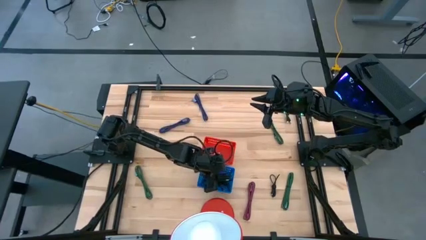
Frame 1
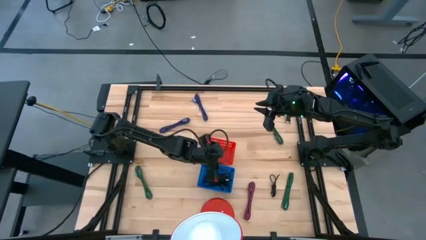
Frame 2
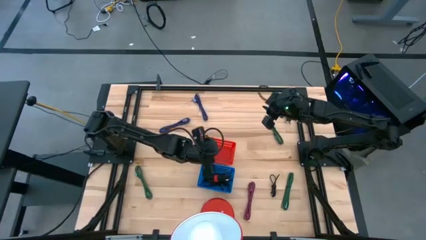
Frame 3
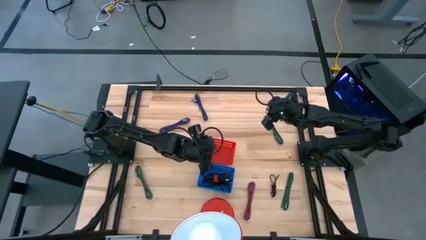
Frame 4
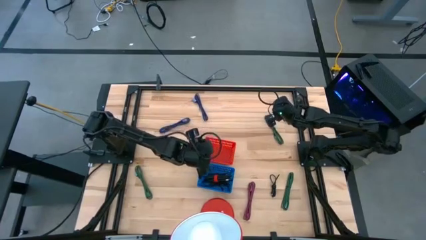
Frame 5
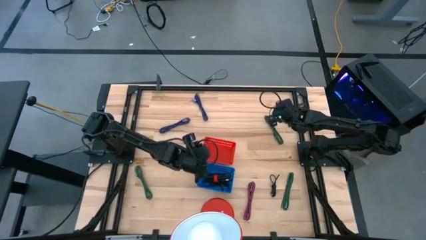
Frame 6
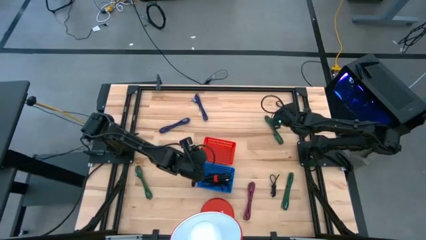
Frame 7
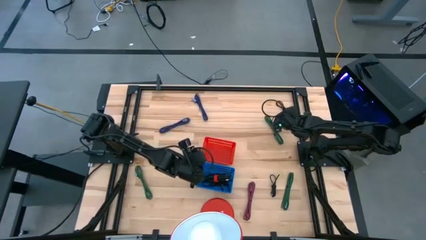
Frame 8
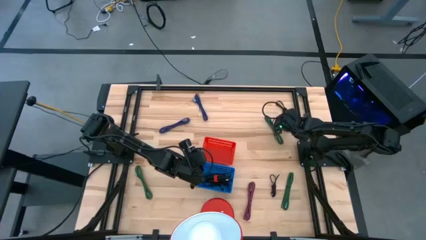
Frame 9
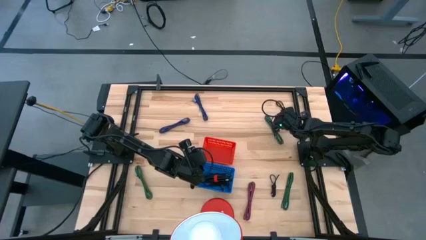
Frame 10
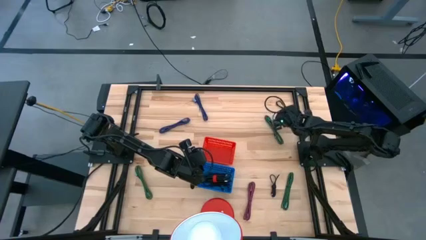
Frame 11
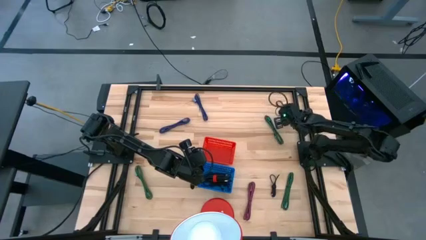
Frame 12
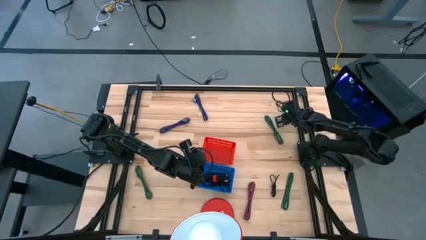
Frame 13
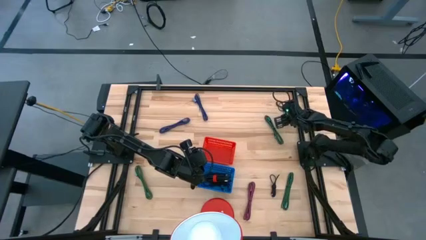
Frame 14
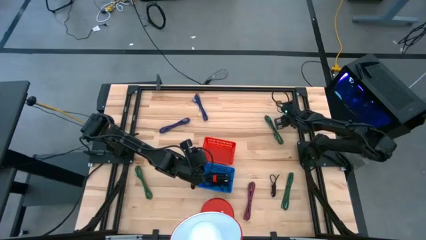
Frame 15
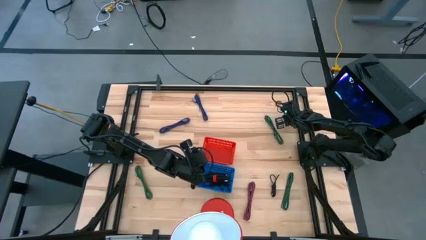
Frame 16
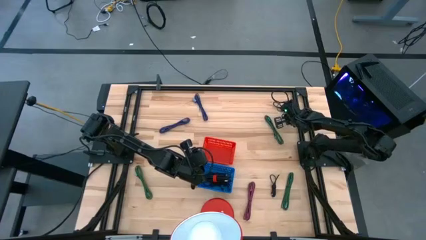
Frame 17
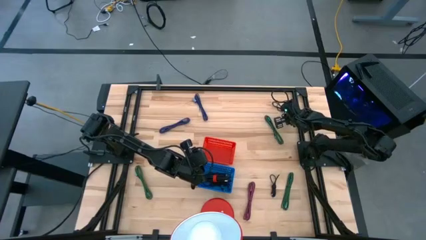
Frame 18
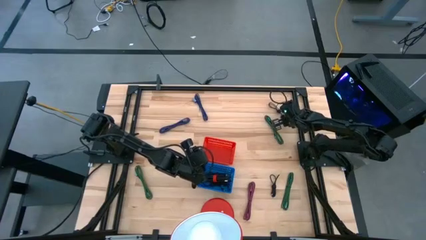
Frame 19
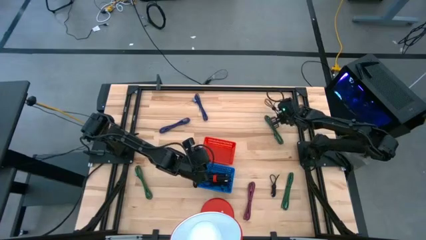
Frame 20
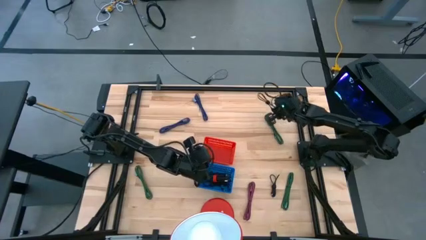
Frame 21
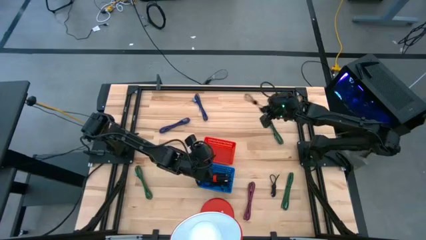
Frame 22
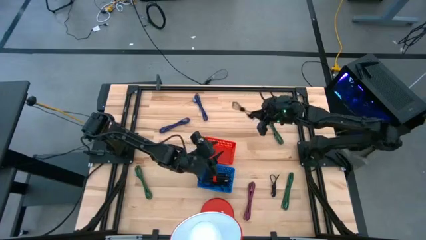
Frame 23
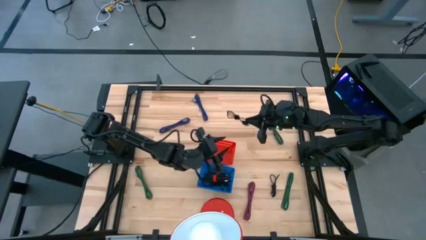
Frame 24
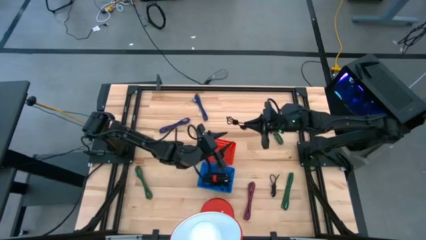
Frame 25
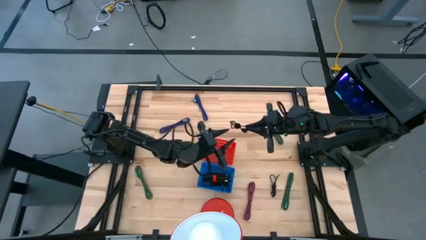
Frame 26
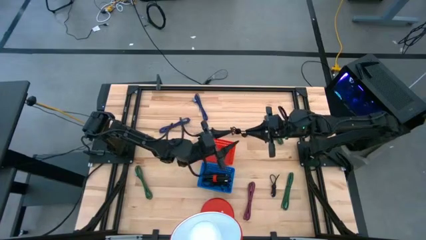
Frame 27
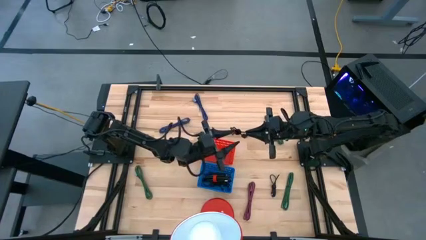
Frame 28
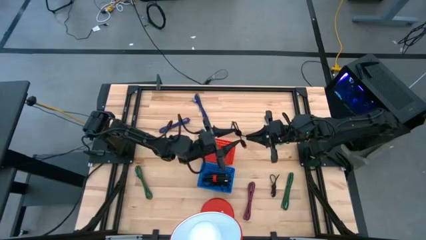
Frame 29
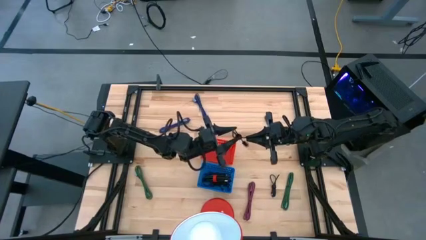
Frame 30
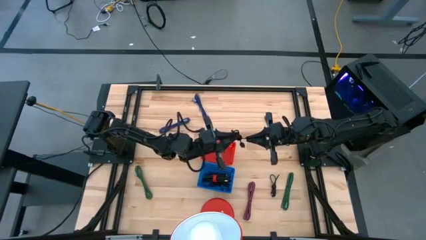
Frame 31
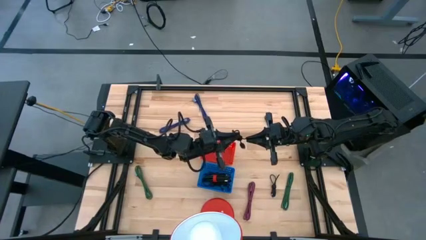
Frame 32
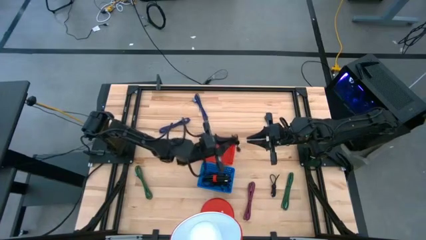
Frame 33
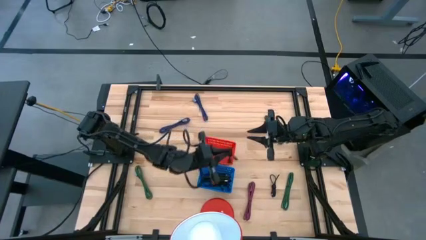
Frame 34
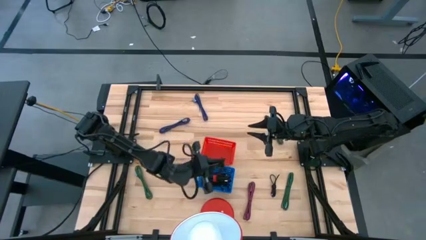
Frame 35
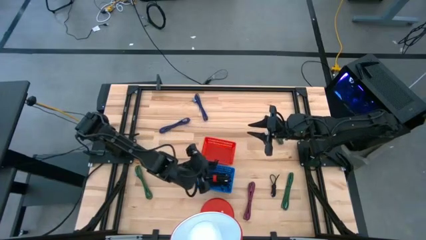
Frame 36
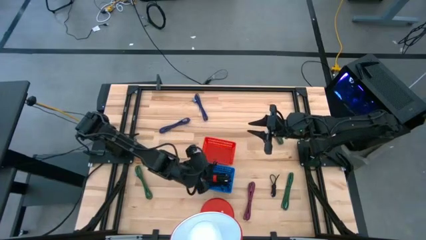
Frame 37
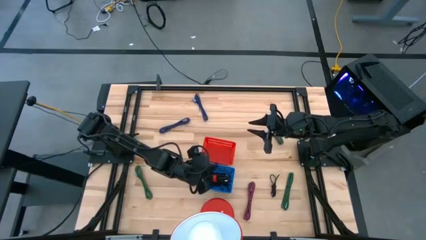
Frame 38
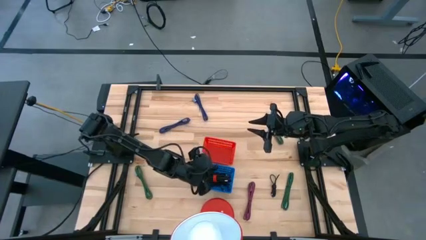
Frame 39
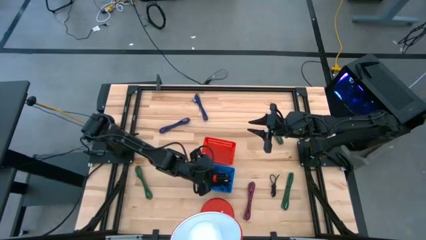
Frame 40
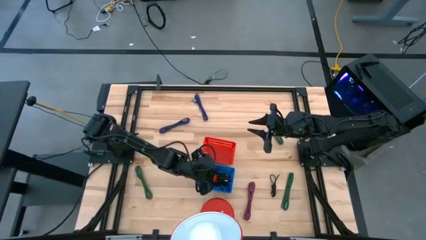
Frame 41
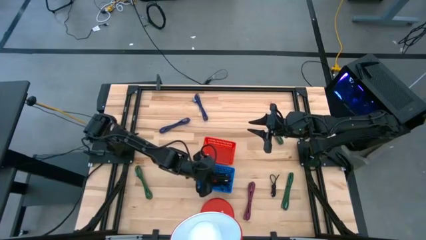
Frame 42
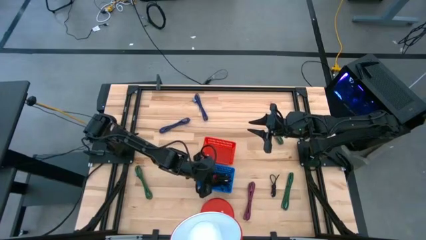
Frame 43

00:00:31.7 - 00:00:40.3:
Task: Pick & Place USB Port
Put the small black USB cable into the blue bin

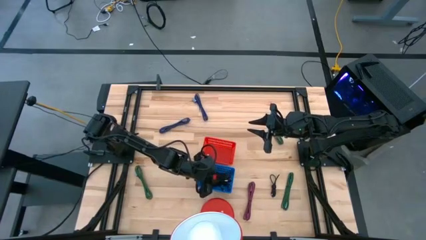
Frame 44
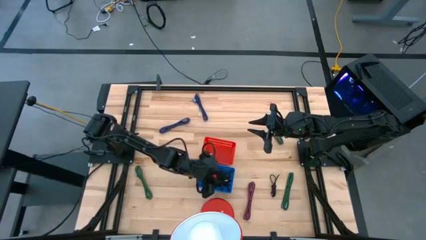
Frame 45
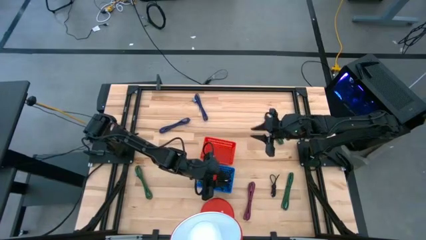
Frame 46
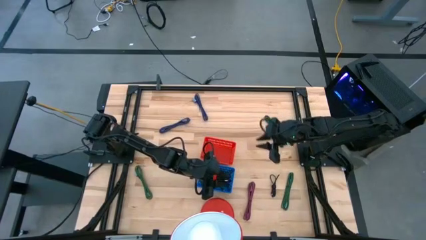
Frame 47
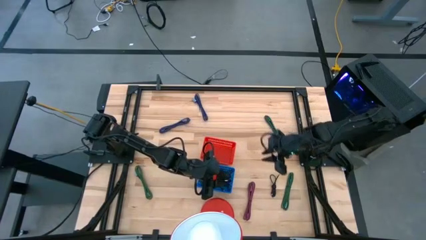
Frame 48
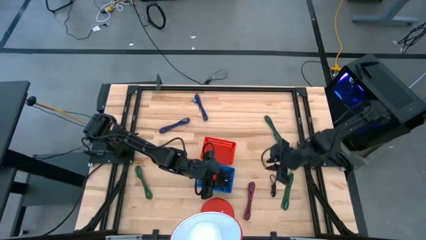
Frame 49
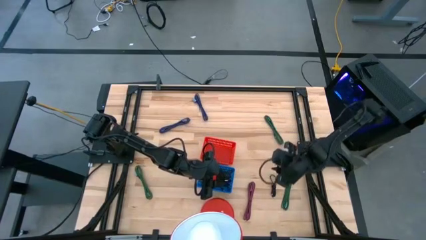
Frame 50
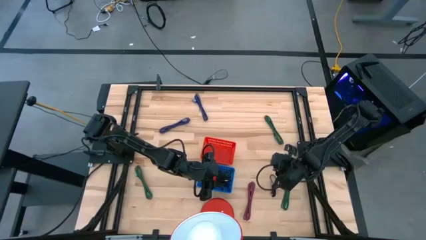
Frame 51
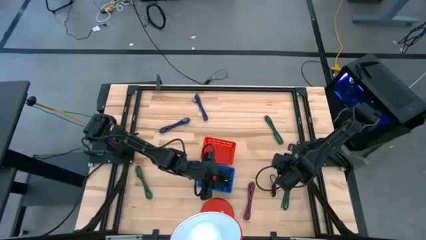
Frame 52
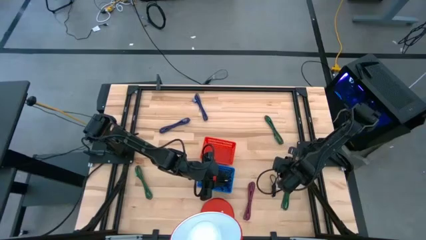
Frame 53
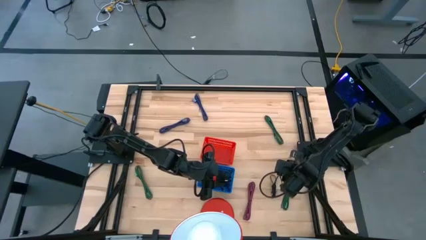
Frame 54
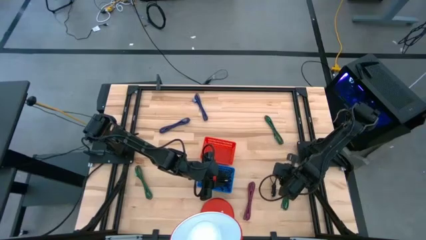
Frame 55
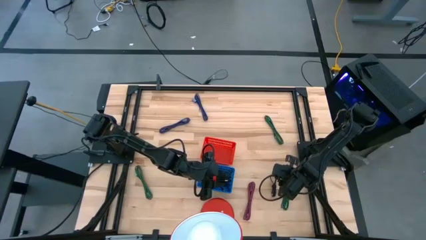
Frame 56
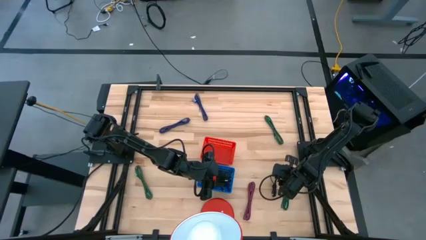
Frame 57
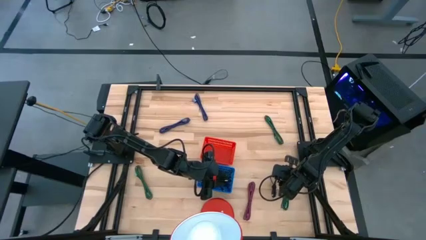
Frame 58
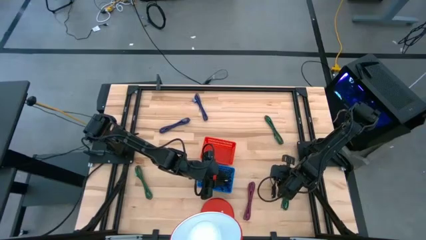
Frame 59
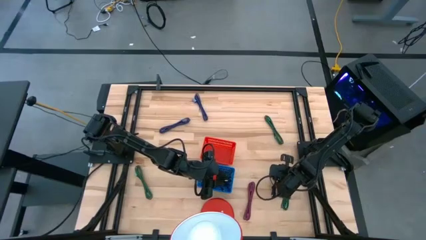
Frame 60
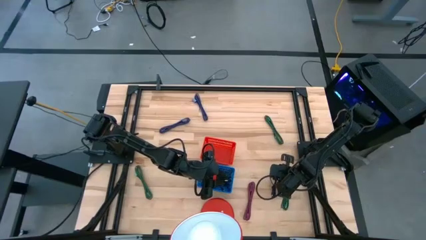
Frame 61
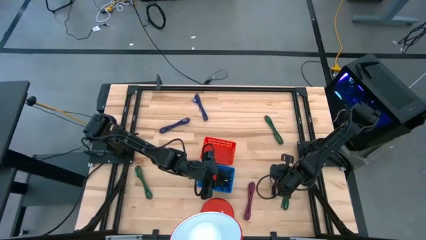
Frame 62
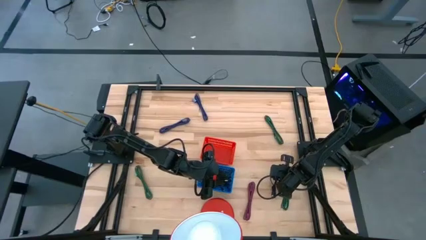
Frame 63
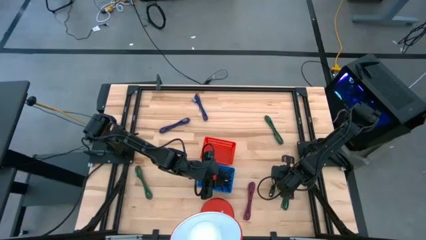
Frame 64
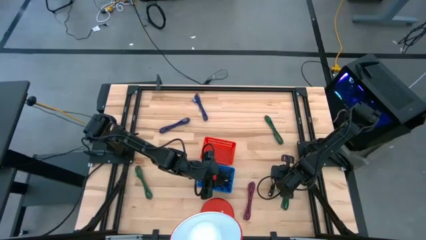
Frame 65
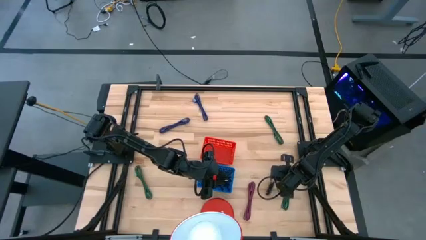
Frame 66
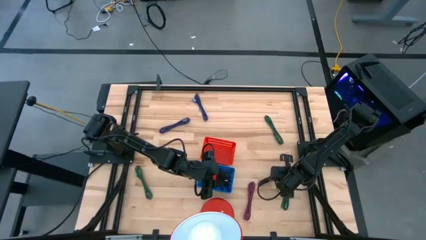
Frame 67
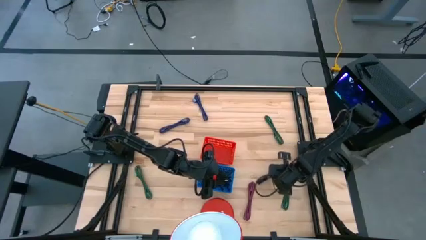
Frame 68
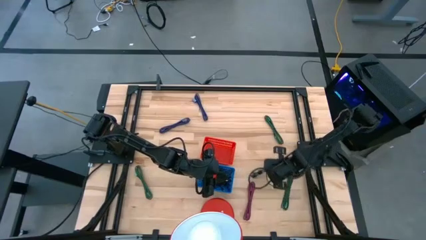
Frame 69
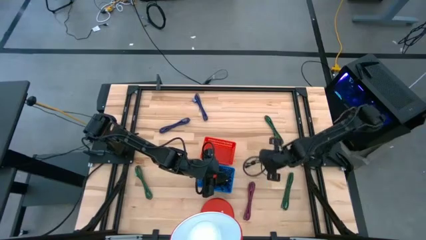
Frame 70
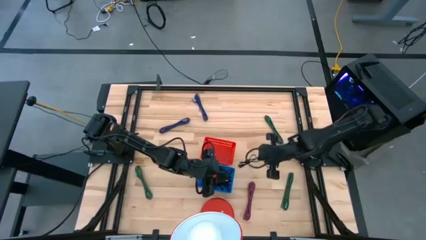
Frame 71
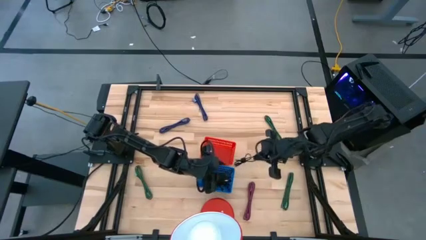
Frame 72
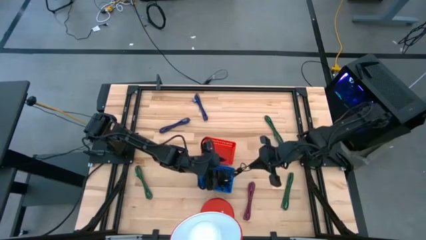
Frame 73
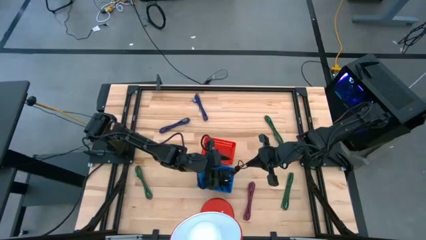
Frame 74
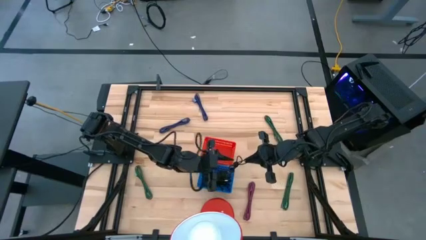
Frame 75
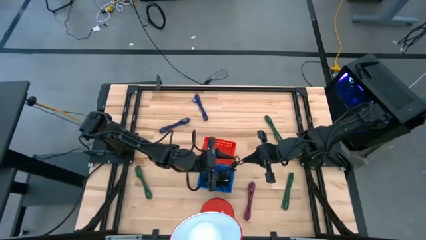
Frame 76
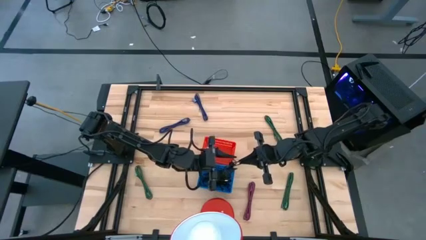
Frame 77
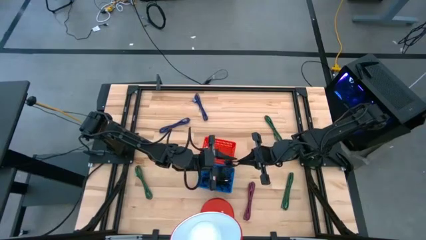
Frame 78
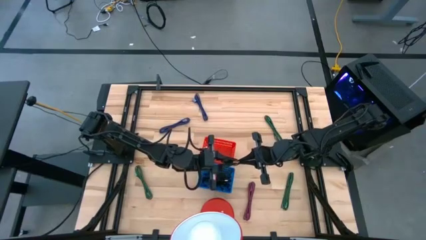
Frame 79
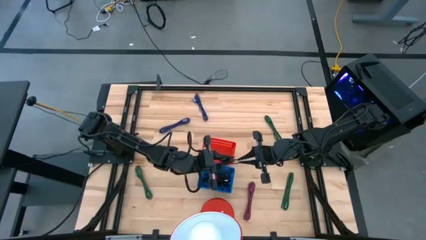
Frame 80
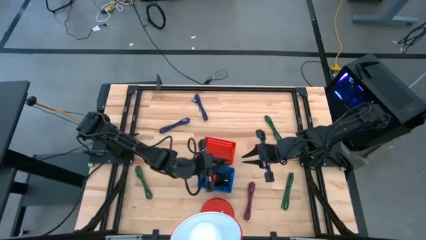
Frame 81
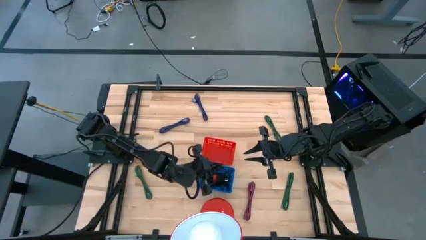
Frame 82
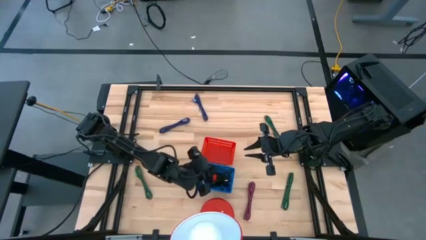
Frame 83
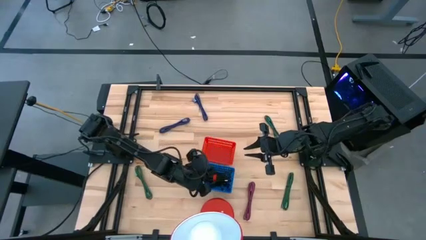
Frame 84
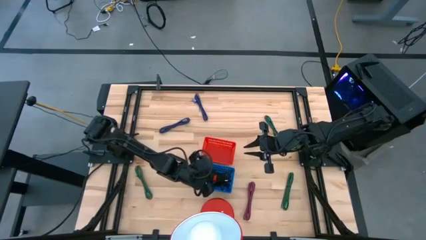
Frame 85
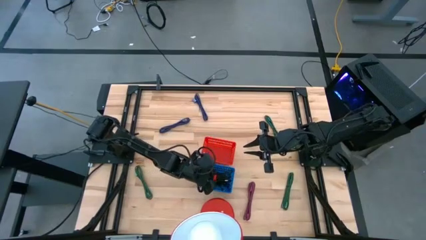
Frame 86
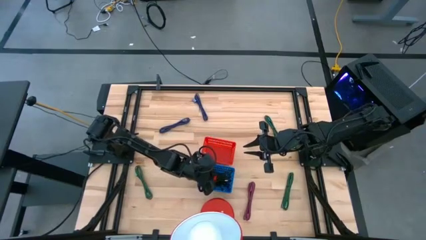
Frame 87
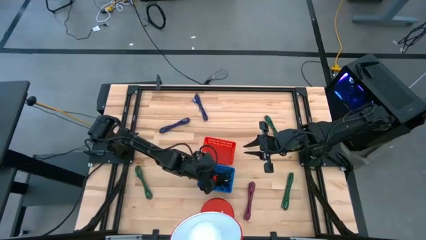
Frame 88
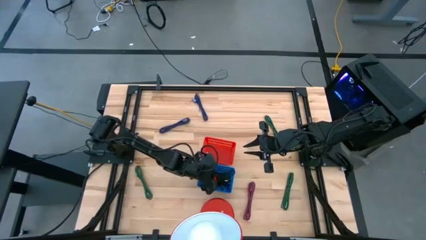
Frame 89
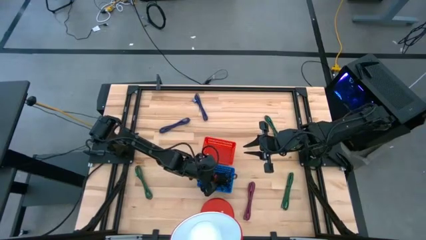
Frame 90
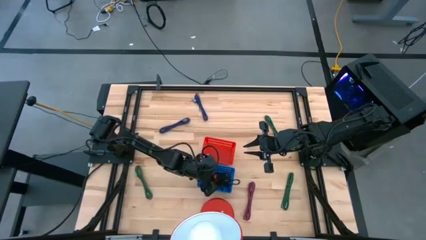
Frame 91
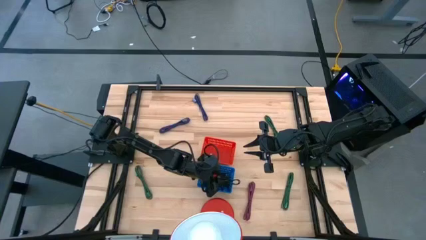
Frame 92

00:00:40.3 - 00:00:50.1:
Put the small black USB cable into the blue bin
